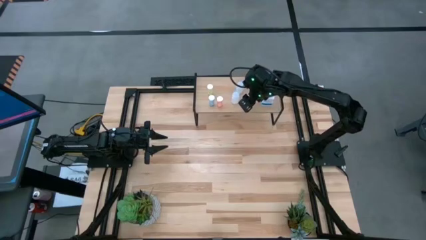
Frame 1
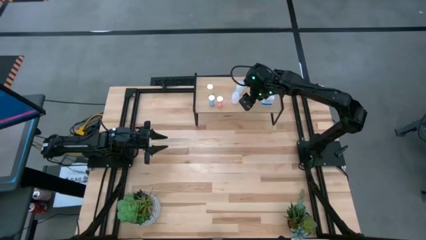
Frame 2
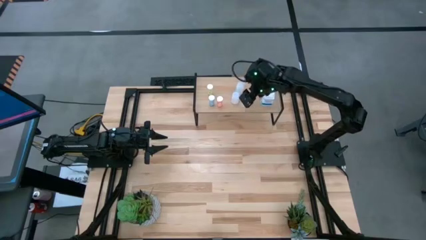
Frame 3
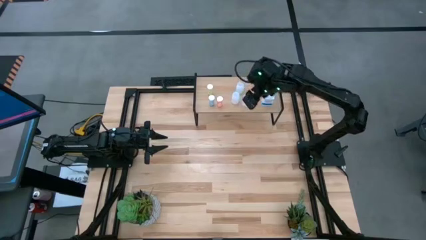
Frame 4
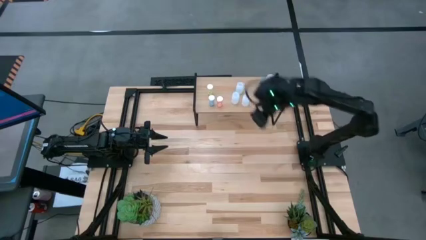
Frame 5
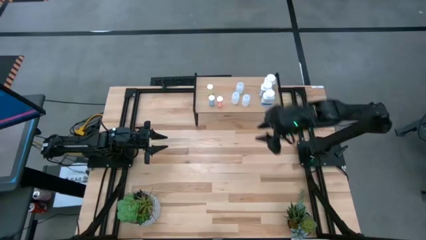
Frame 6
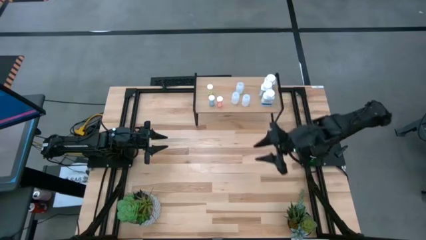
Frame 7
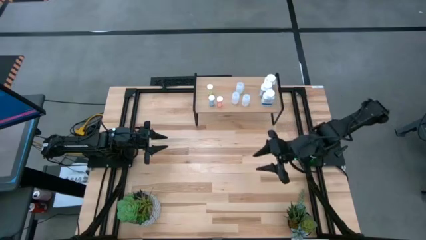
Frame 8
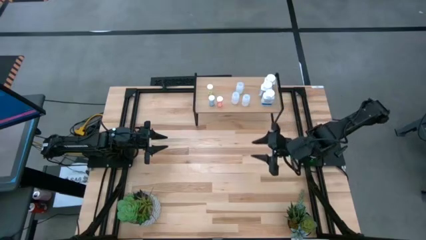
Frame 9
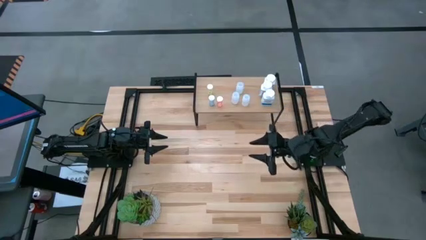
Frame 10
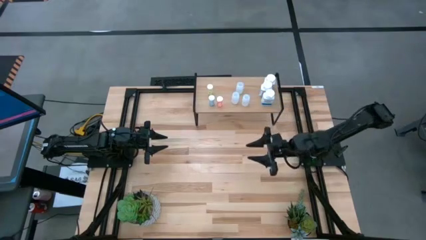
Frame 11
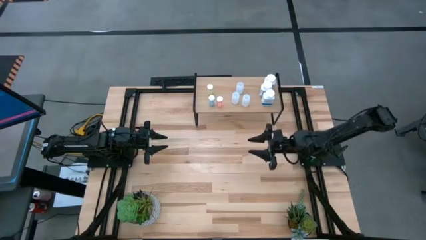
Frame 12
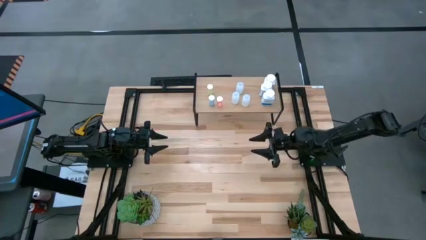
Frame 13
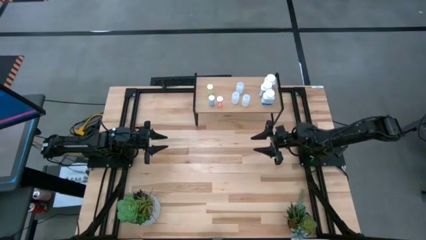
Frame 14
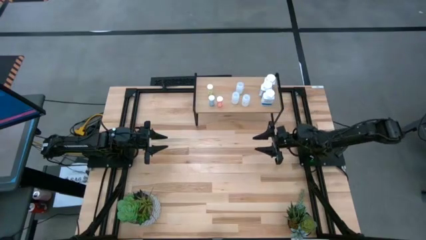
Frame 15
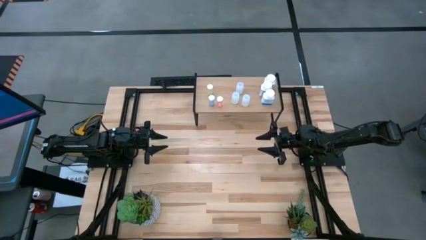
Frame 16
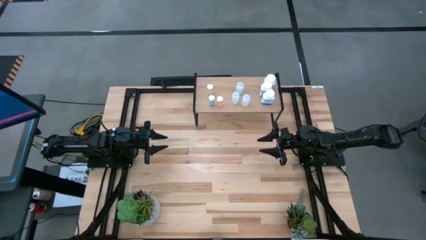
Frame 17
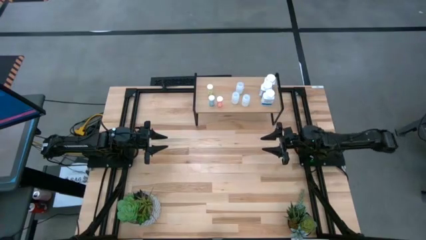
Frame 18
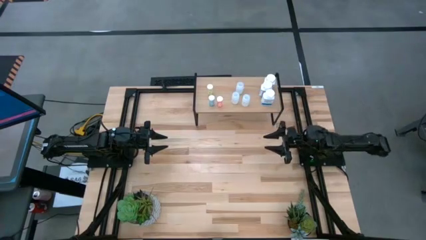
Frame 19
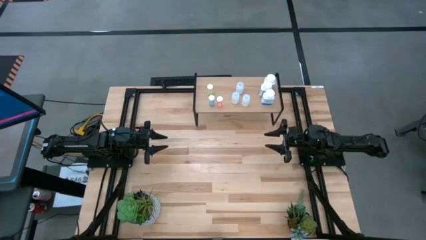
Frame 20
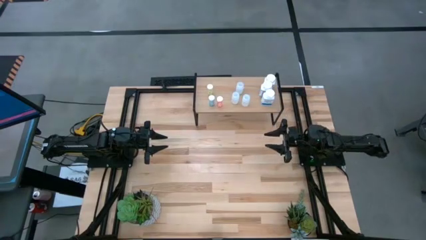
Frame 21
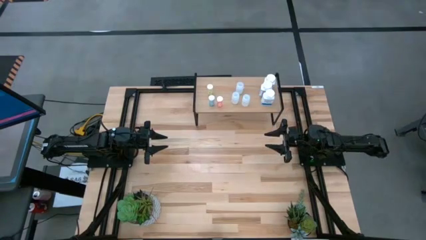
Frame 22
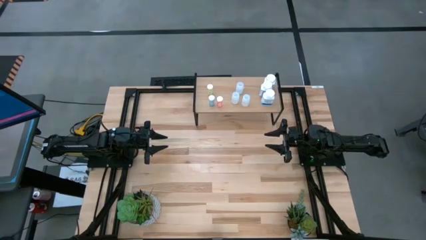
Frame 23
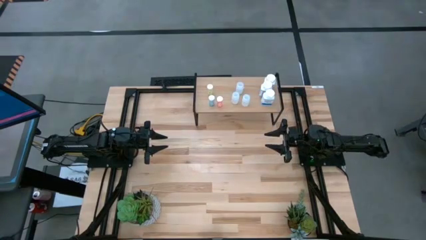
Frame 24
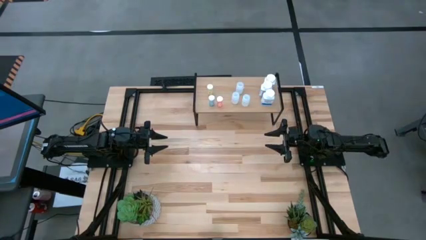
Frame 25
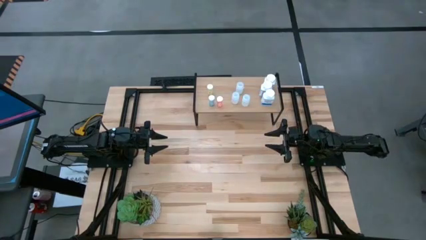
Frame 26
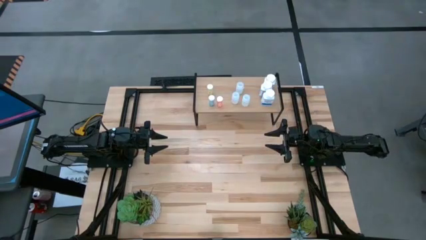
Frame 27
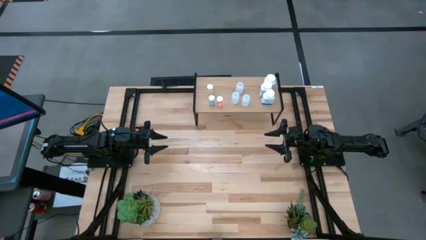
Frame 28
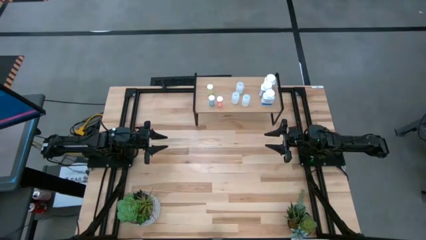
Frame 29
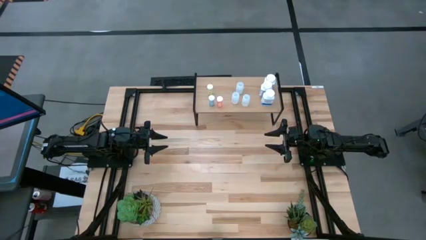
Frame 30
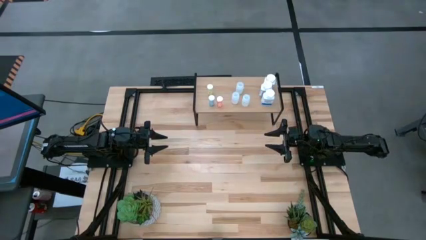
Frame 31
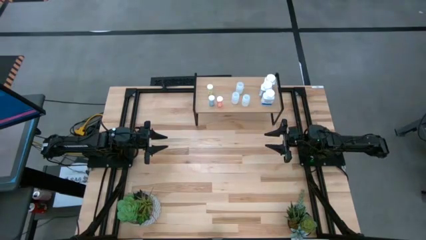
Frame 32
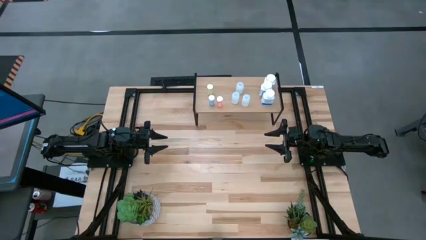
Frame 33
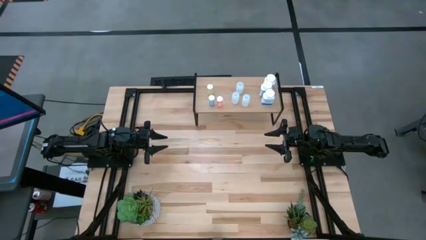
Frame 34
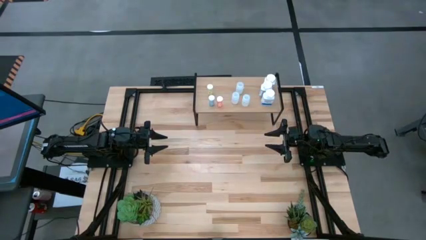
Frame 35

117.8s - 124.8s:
Task: Pick and place medicine bottles onto shelf by color
Return to Home Position

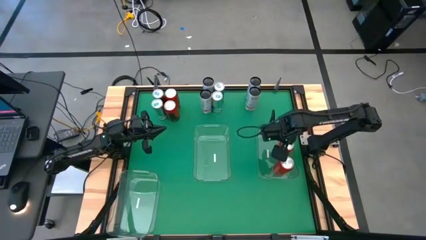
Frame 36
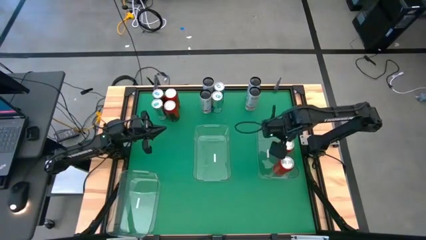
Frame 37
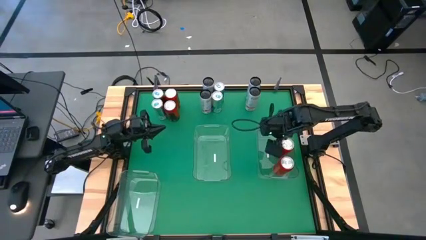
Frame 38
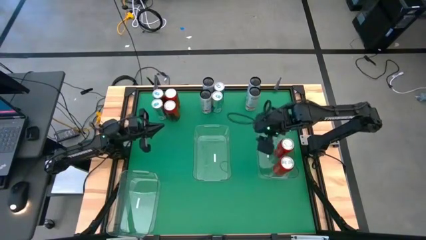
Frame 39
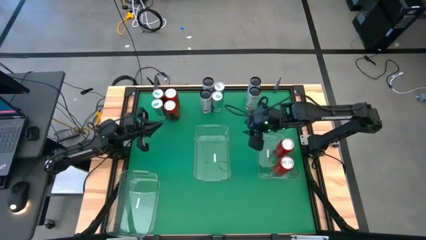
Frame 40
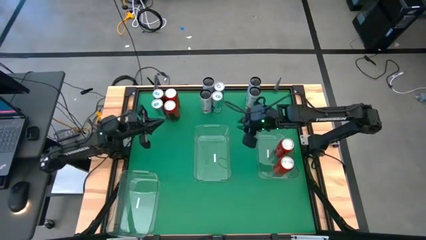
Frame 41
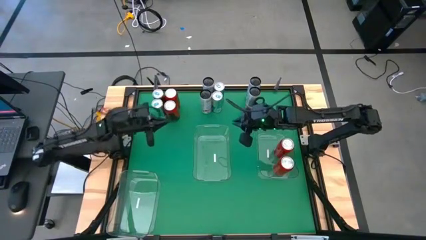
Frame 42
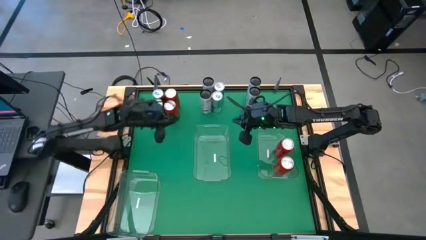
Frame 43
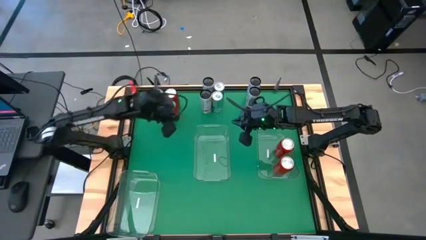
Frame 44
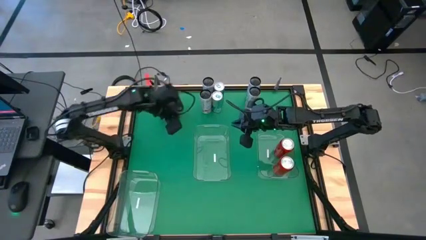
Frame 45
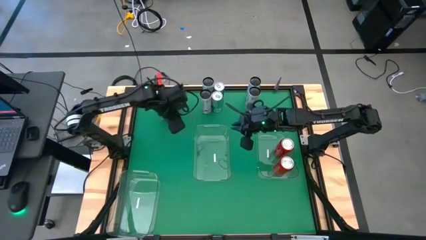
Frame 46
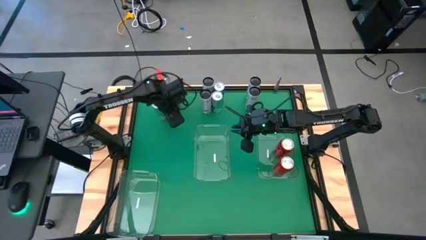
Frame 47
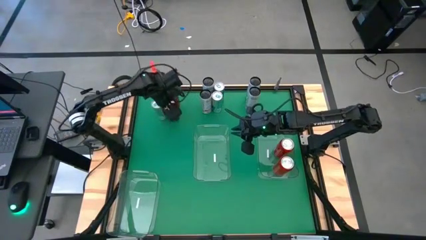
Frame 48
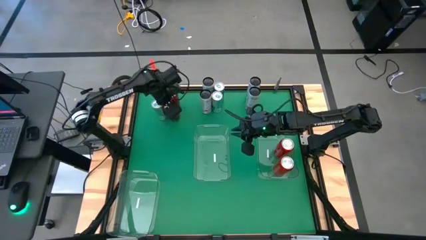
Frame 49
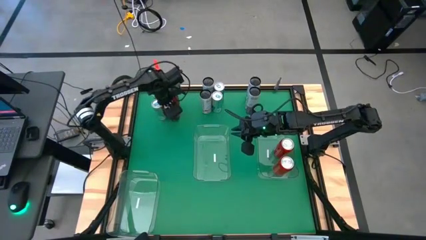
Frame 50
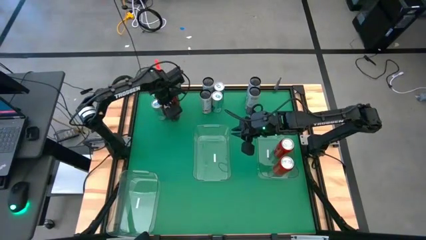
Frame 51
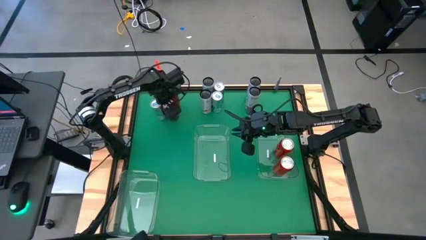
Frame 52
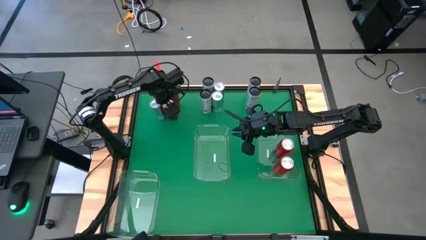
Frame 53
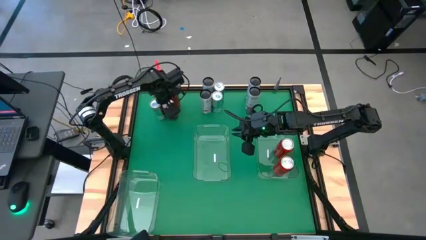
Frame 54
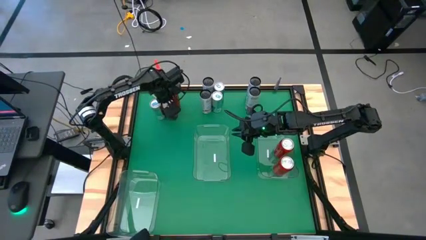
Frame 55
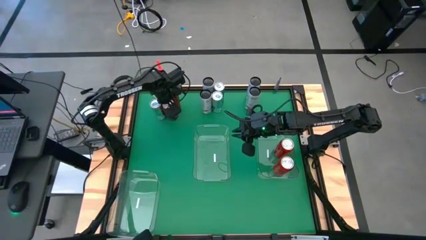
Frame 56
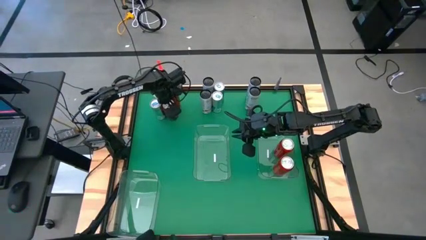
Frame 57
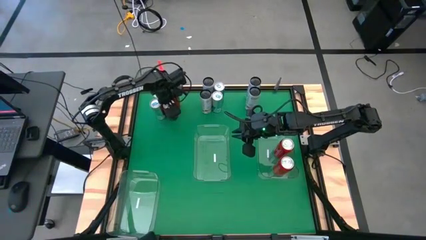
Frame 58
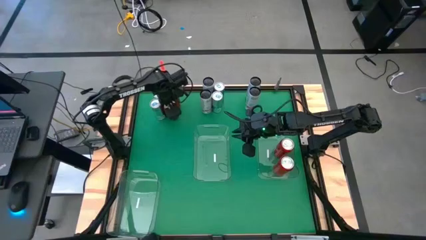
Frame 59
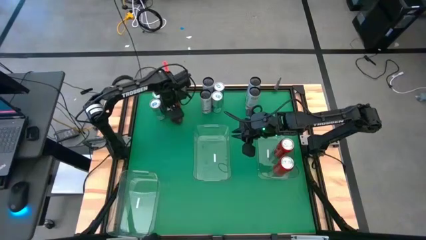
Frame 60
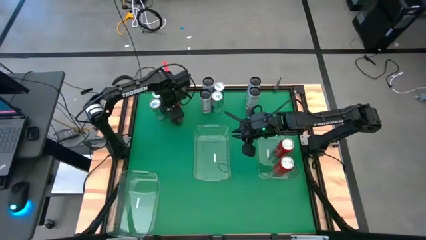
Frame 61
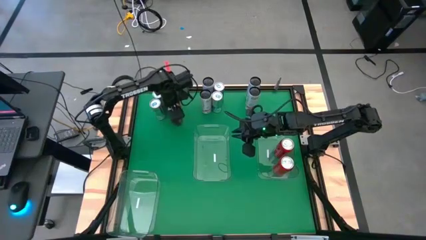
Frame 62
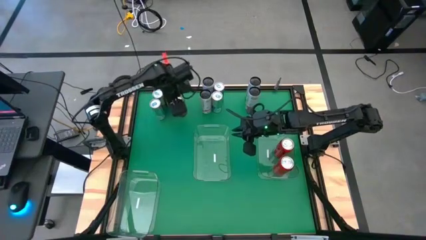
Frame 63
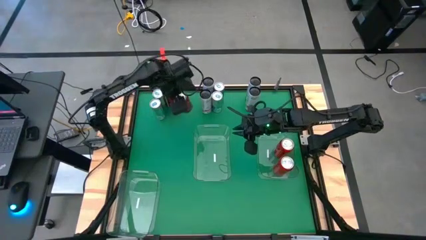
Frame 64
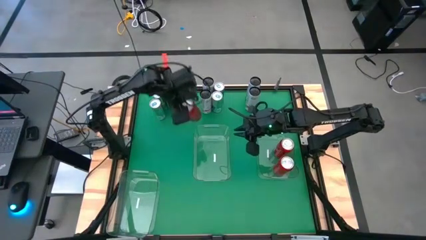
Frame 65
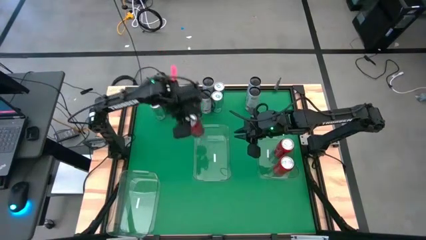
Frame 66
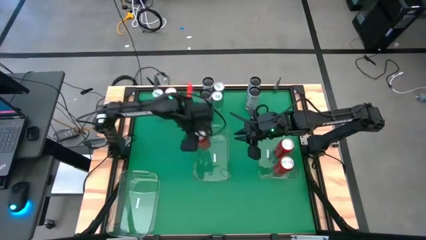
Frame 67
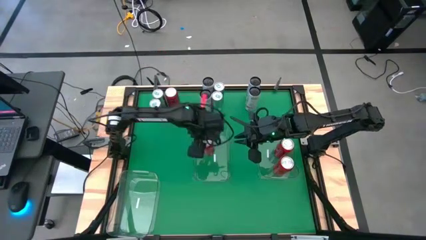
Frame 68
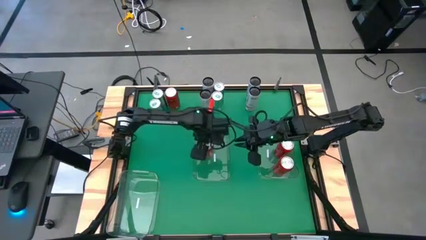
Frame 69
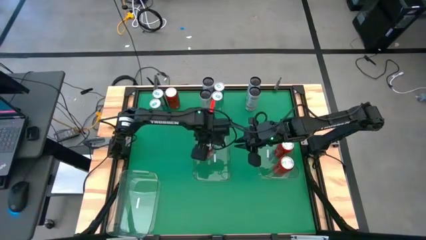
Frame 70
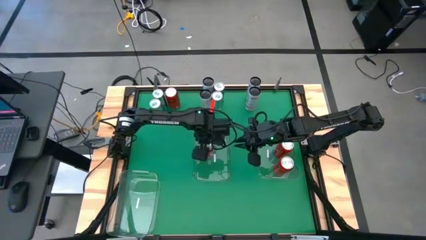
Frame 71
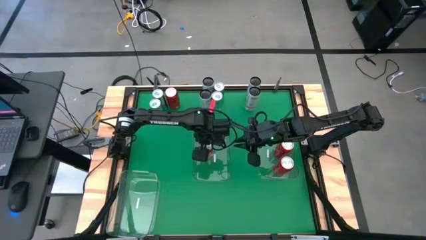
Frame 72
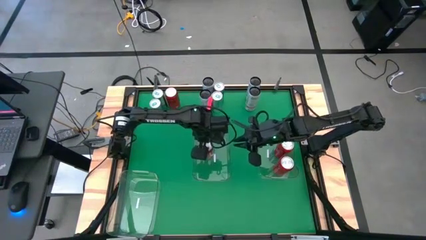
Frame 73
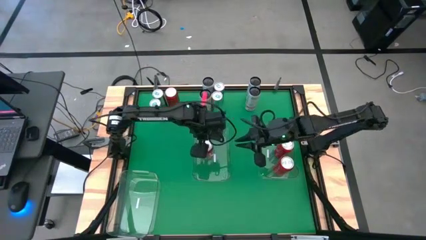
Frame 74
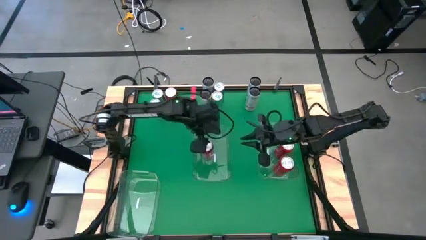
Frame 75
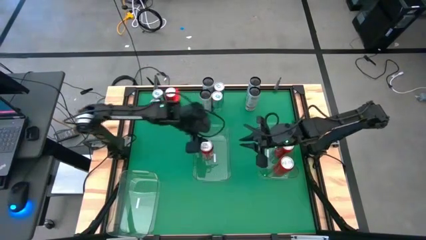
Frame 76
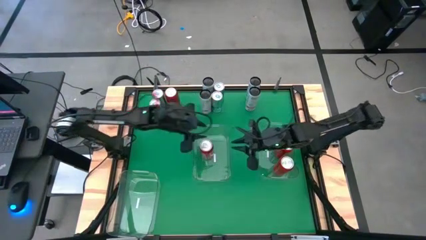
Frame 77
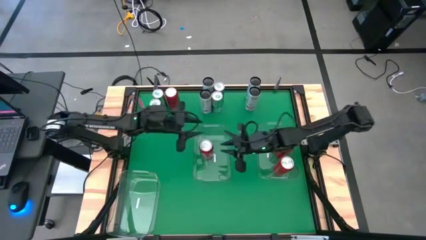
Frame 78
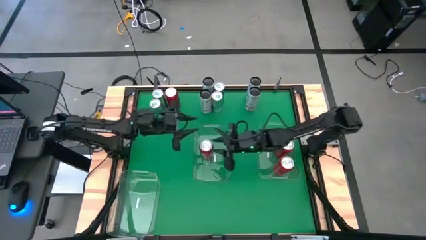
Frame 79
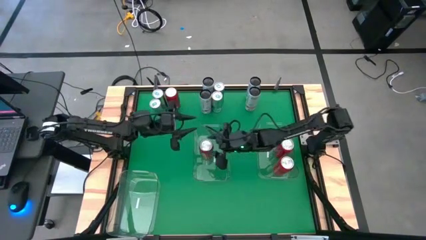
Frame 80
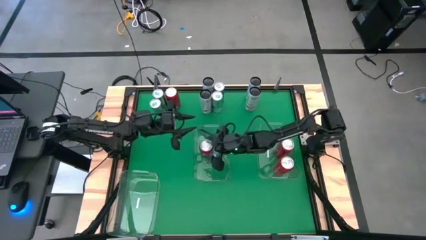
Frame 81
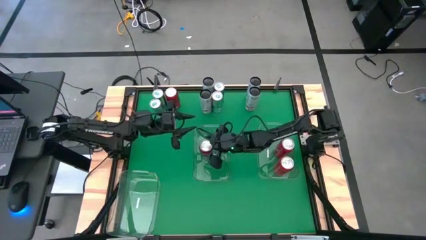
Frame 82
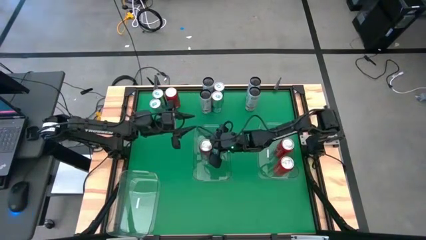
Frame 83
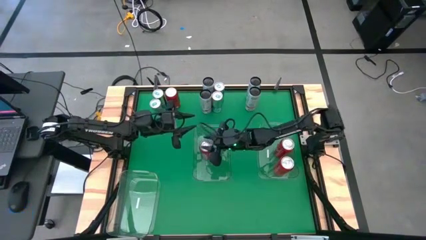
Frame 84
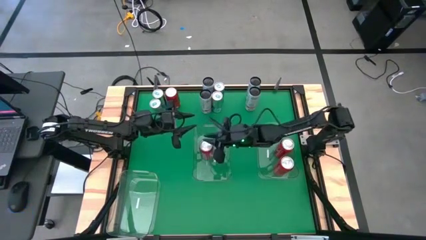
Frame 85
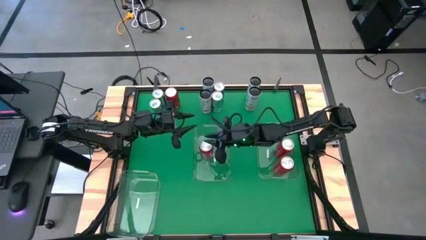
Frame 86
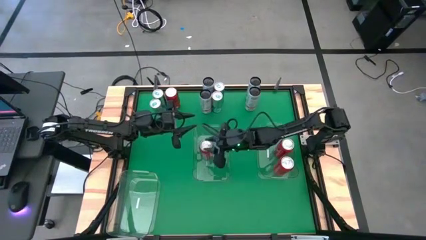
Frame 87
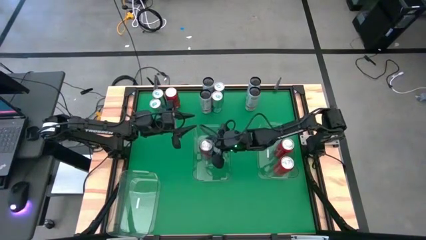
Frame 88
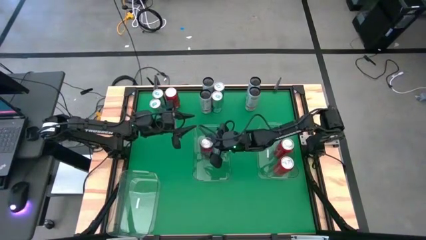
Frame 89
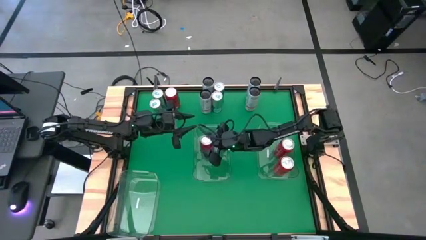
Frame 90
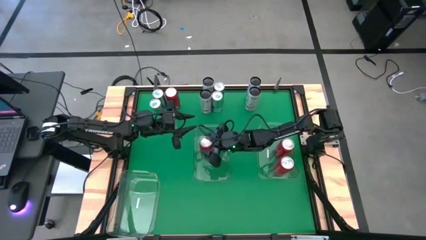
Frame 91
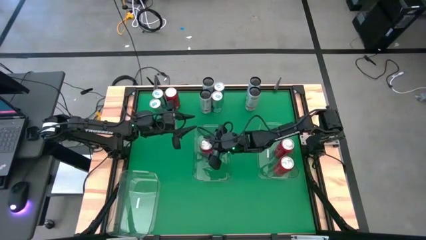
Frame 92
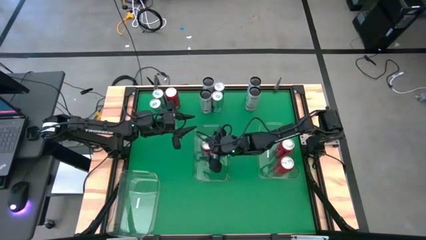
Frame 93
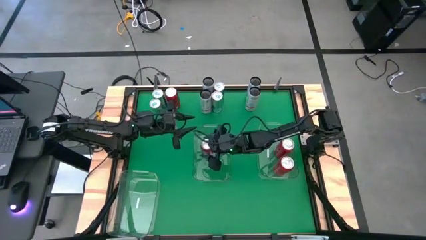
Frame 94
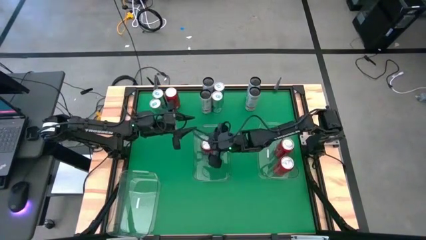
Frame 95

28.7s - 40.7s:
Task: Sort soda cans
Put the bottom red-black soda can into the top right transparent bin
